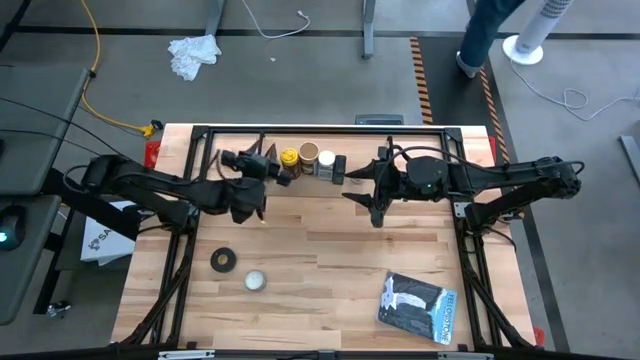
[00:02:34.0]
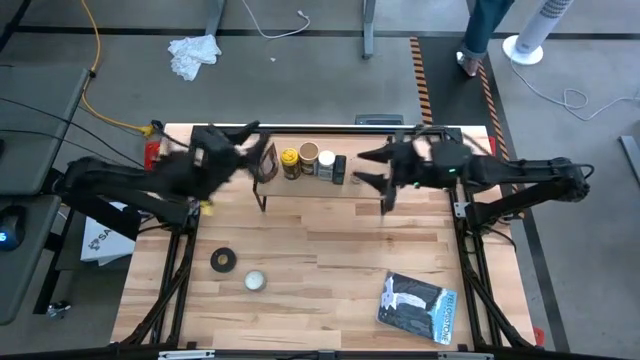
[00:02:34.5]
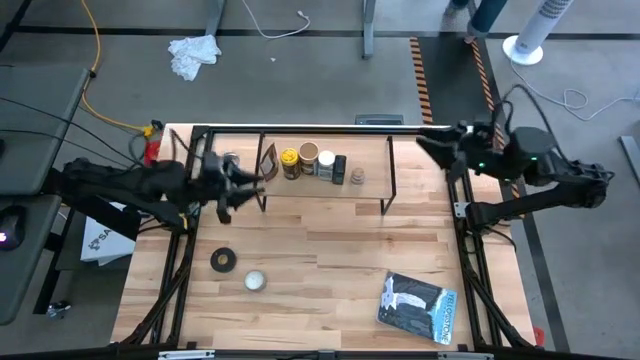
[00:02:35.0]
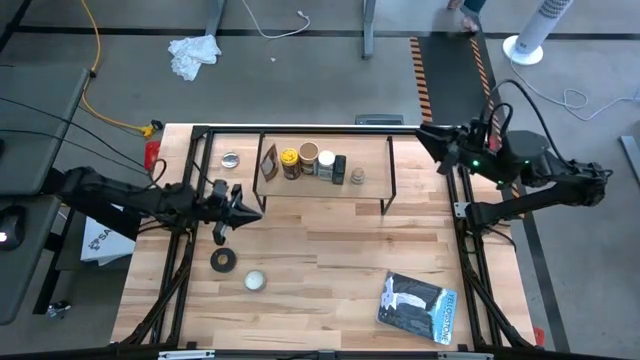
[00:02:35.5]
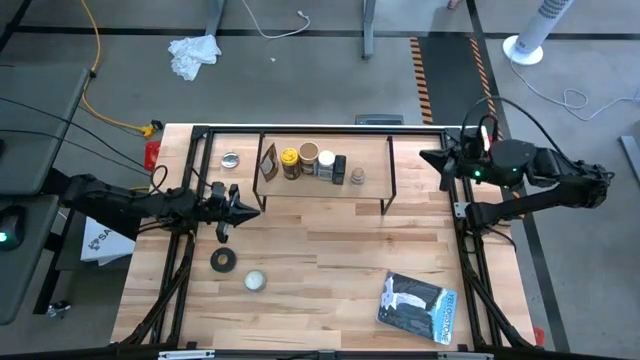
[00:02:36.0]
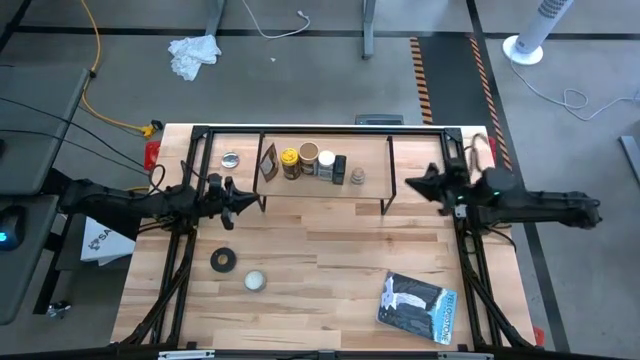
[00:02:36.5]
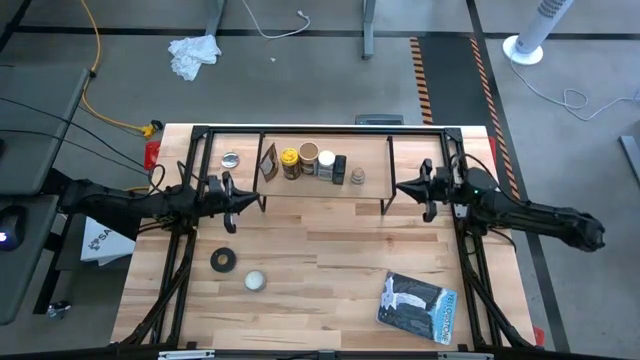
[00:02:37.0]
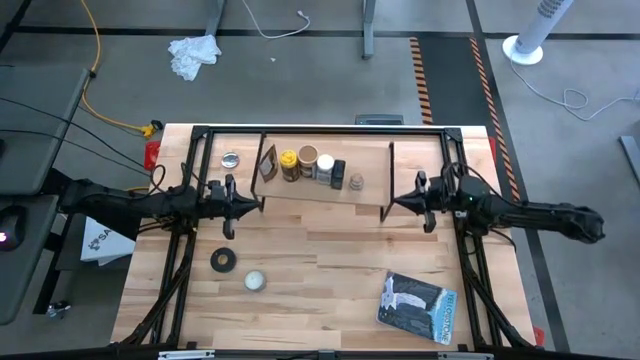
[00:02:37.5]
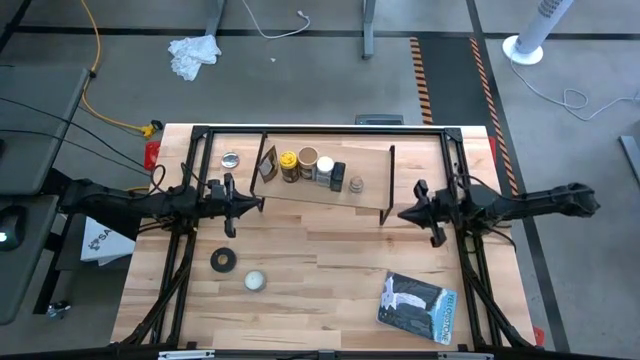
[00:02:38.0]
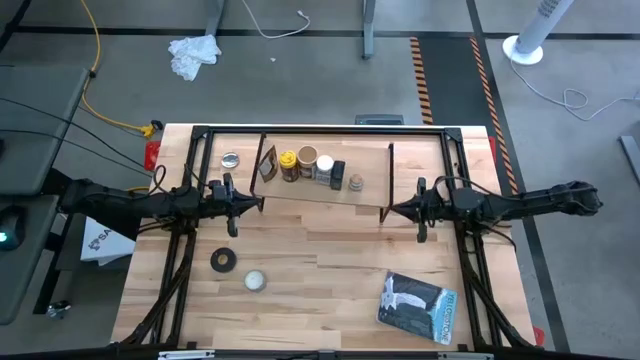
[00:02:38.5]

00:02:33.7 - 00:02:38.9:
Task: Shelf spices
Adjust the shelf

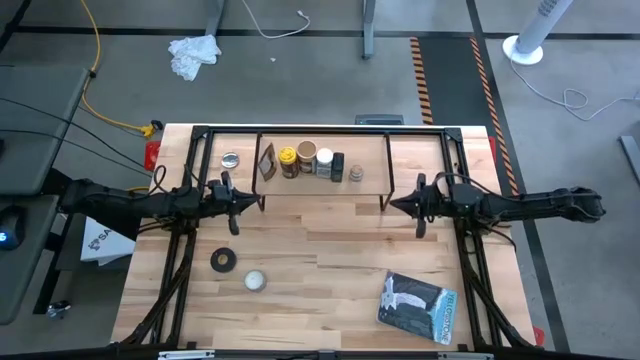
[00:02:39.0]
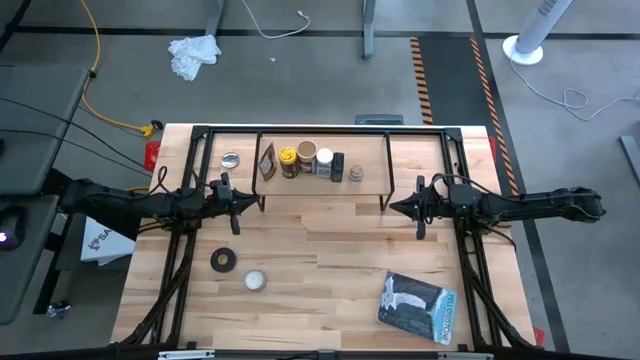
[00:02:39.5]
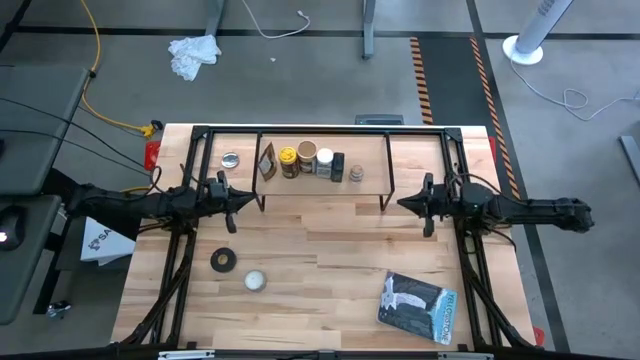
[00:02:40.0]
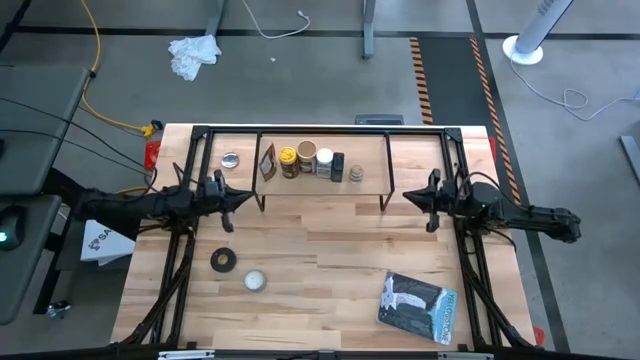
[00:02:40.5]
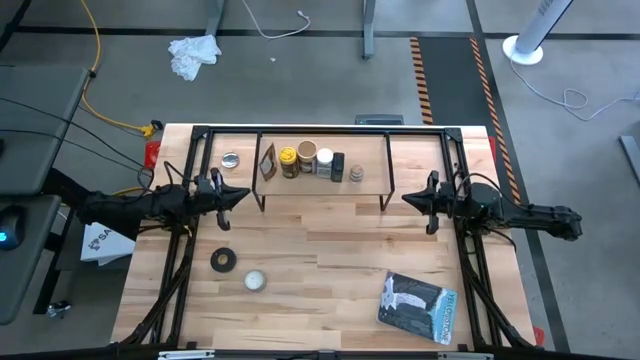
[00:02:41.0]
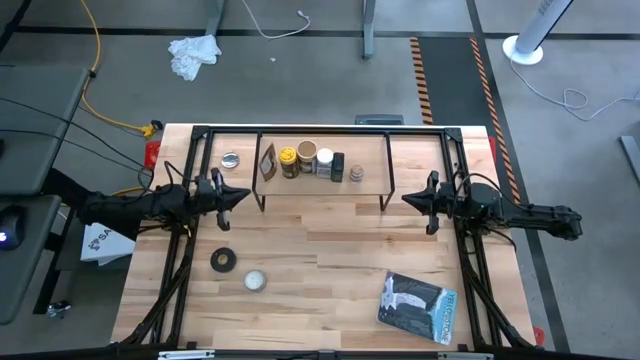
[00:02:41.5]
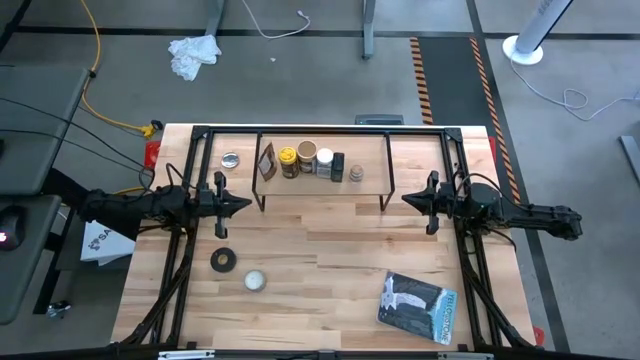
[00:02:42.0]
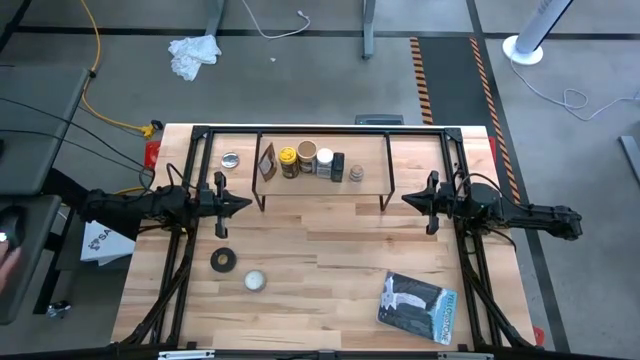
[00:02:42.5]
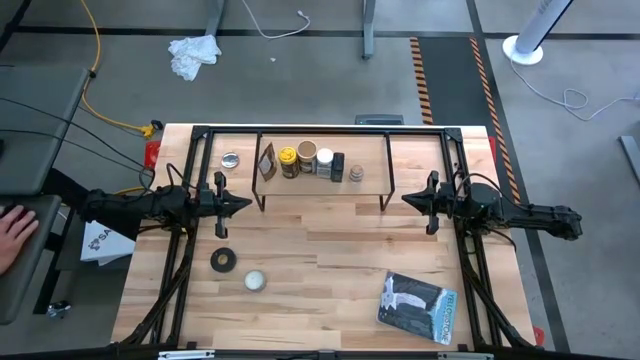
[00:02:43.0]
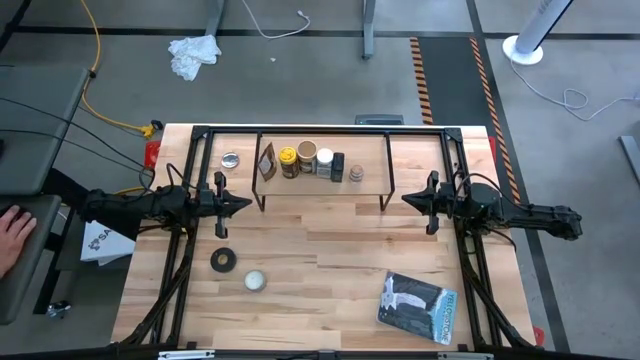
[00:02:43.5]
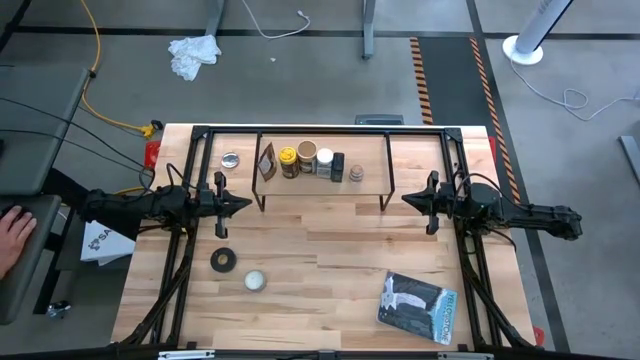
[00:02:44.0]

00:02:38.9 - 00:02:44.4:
Return to Home Position

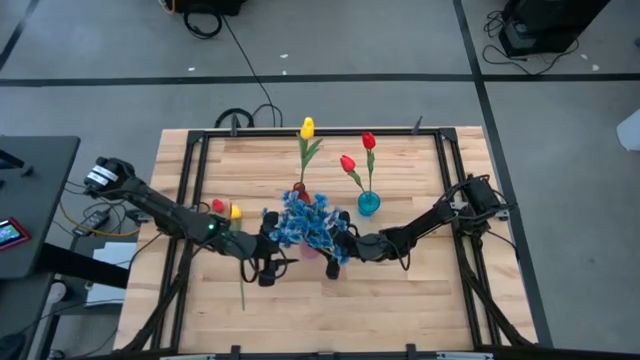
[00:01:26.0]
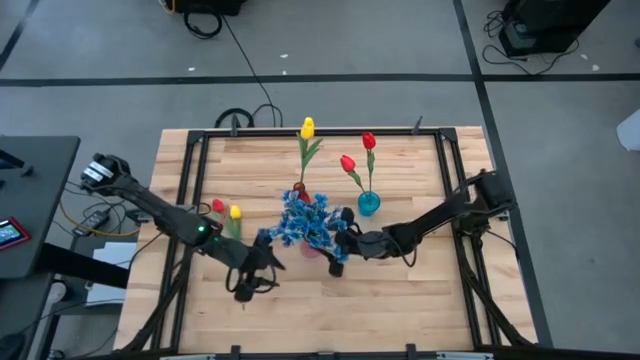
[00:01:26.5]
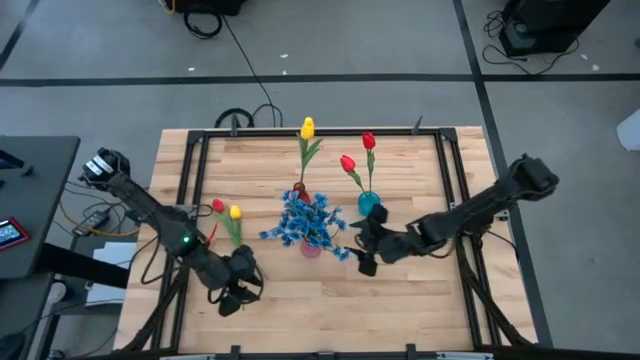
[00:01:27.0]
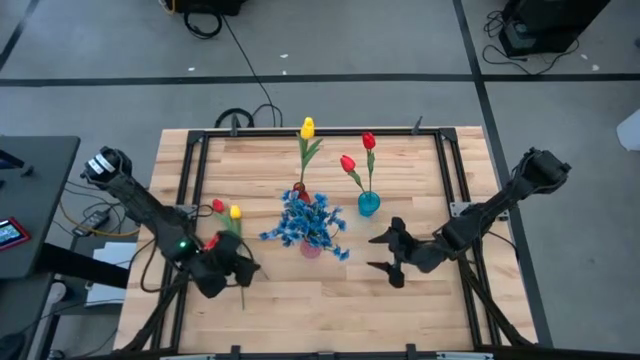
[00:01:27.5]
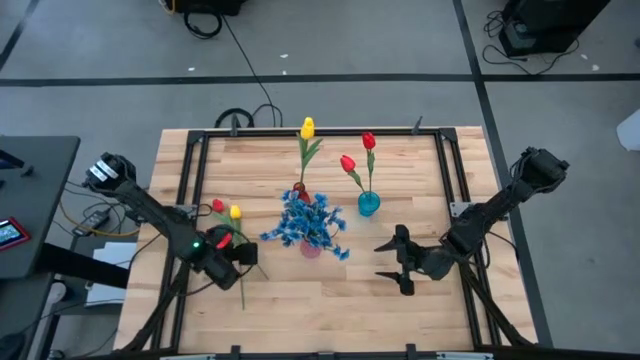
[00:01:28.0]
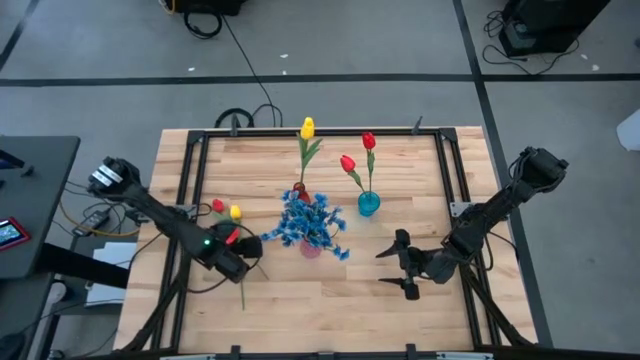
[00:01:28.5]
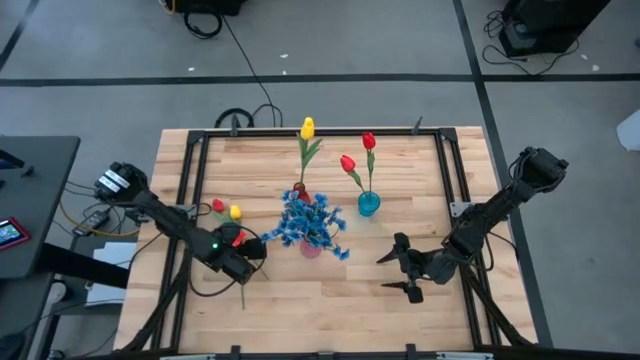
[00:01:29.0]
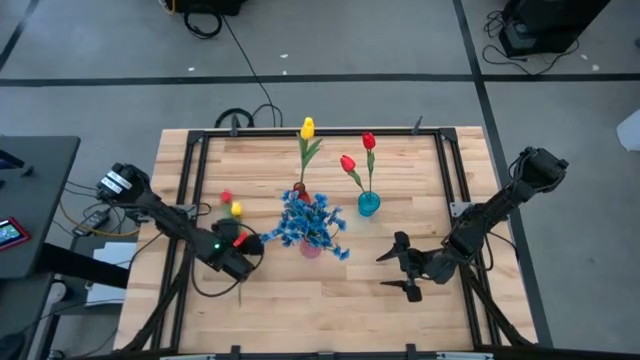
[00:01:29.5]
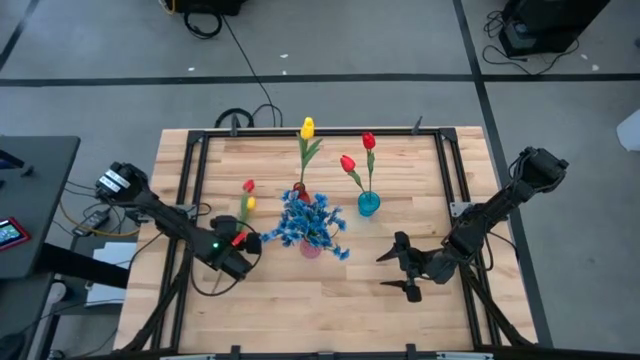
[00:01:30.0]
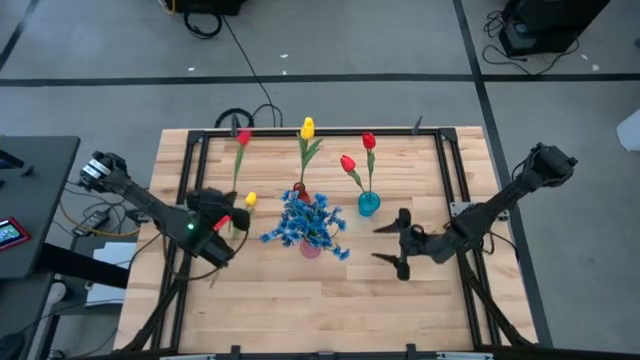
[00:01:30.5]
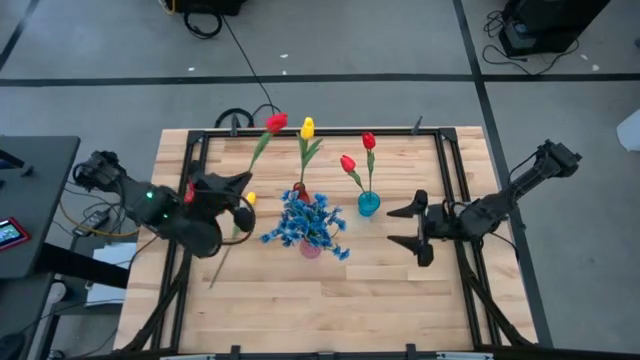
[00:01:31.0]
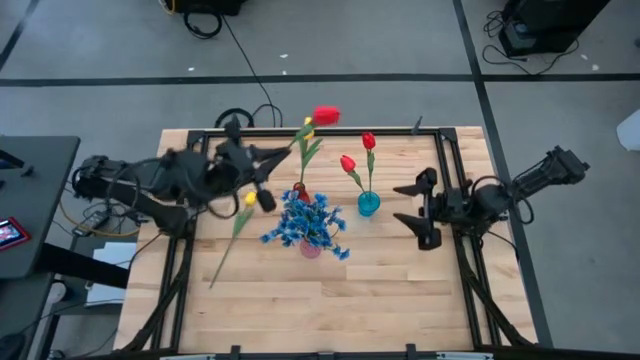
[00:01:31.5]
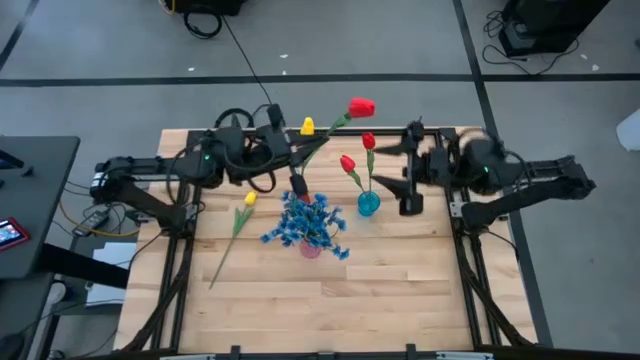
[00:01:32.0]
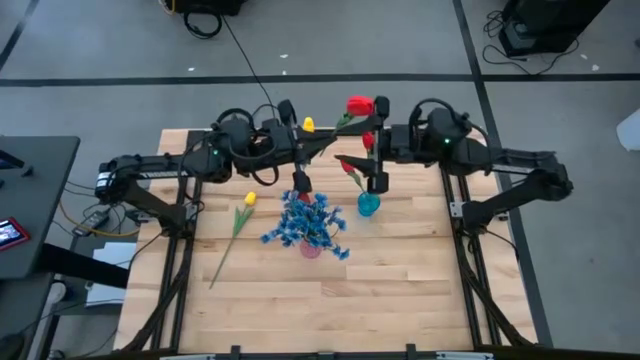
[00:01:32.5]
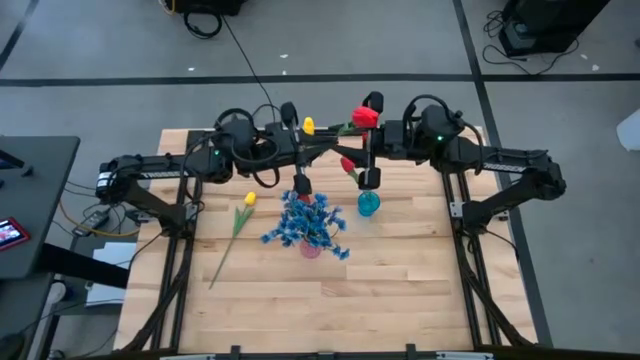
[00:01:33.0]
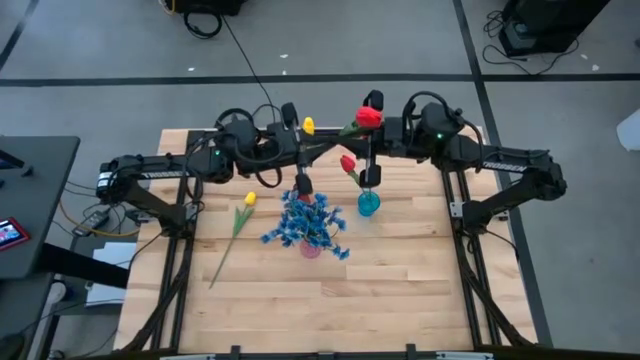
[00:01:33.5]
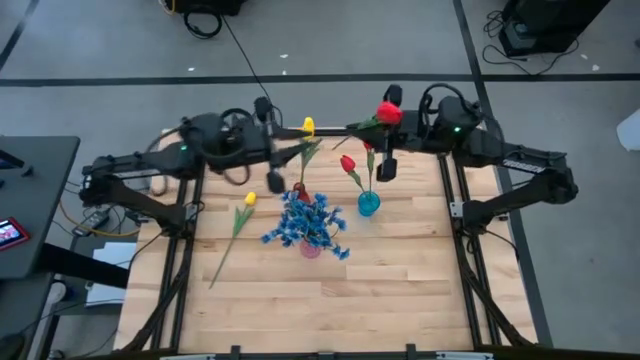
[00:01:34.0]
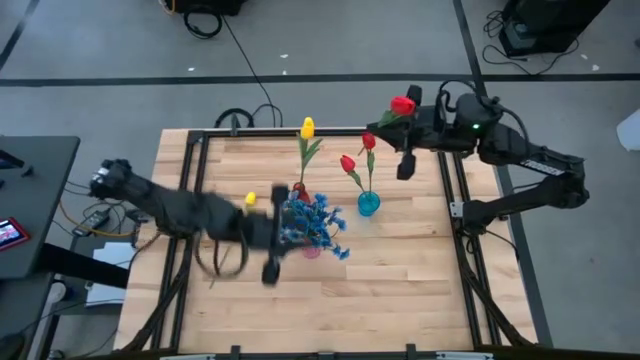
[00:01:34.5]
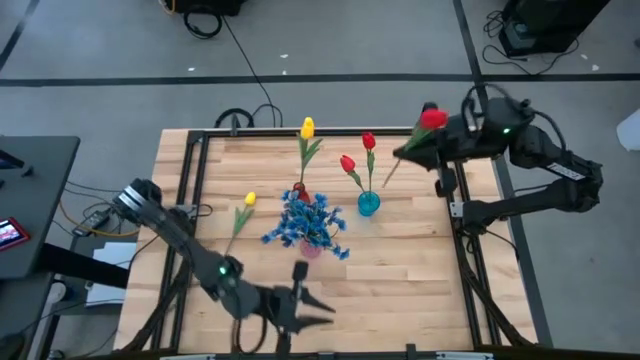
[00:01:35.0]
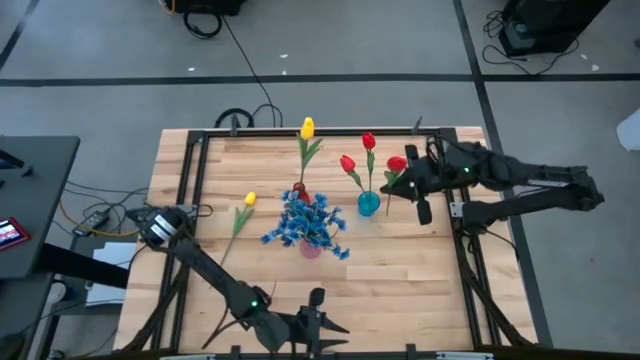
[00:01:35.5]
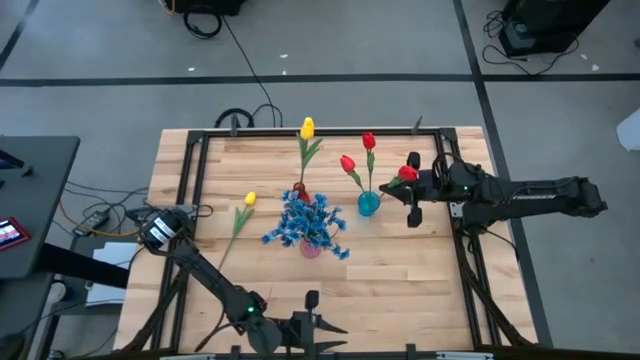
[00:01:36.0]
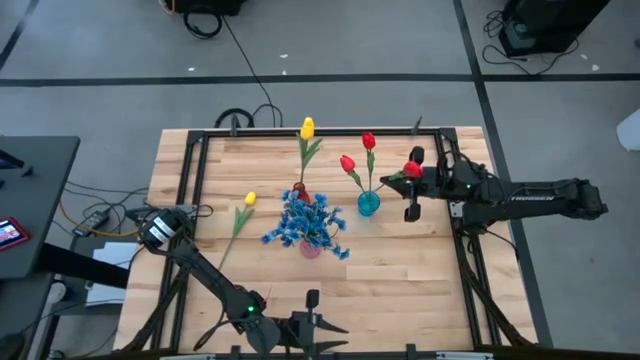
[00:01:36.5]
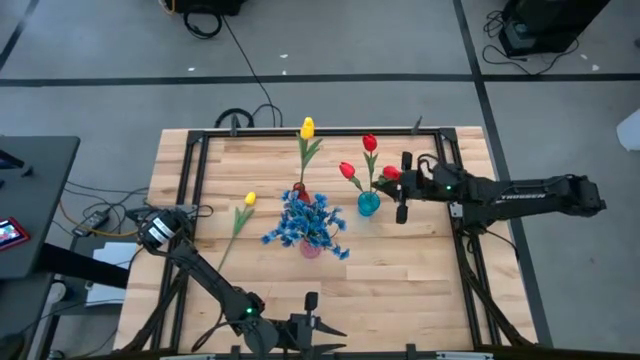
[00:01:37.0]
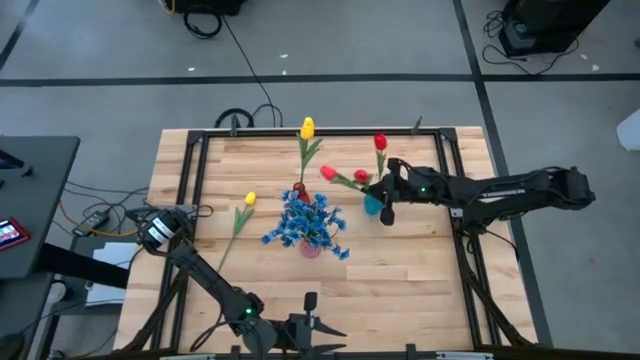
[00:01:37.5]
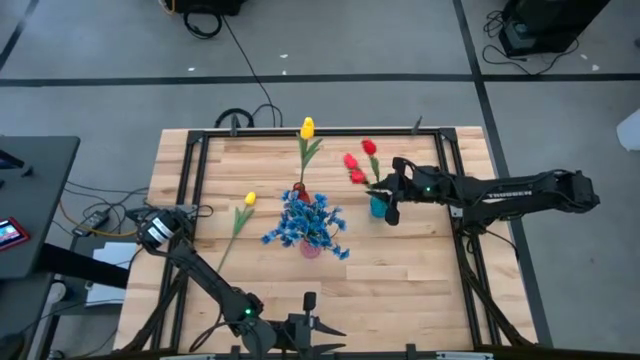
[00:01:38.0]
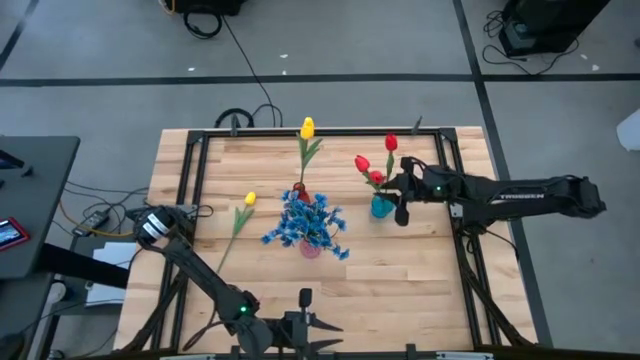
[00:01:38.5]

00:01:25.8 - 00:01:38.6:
Task: Sort flowers into vase by color
Put the red tulip into the blue transparent vase
